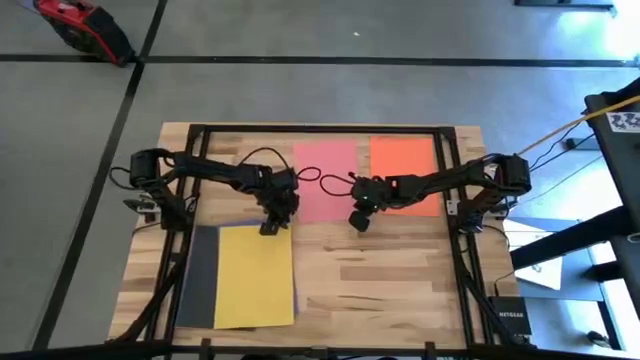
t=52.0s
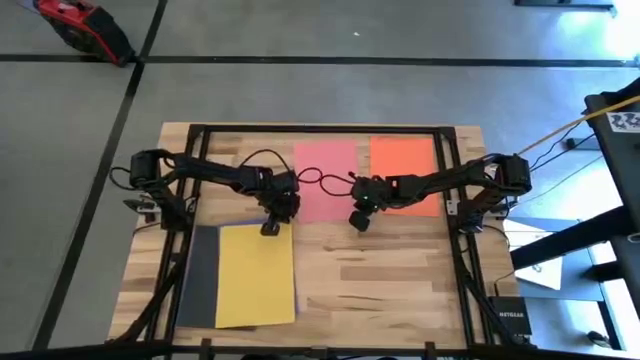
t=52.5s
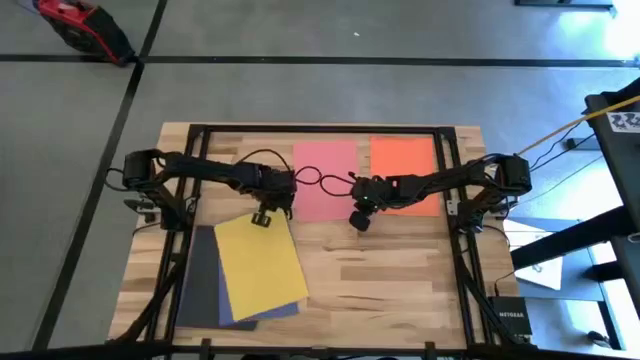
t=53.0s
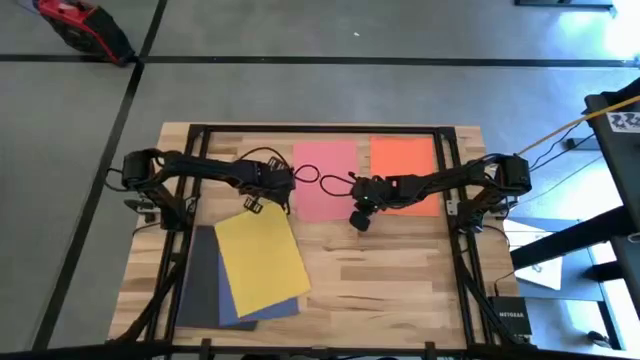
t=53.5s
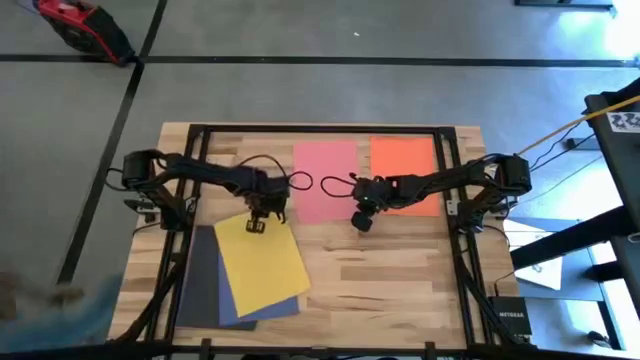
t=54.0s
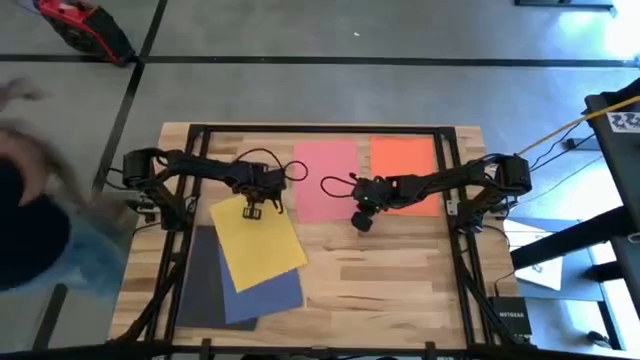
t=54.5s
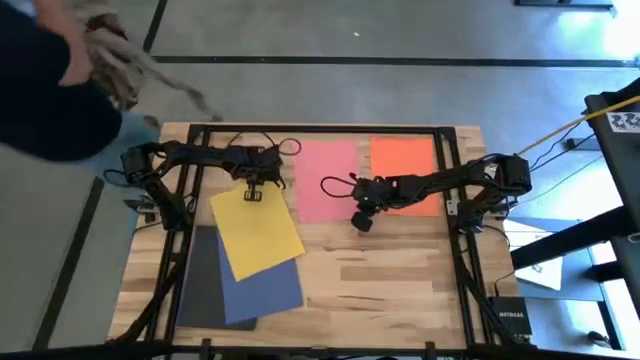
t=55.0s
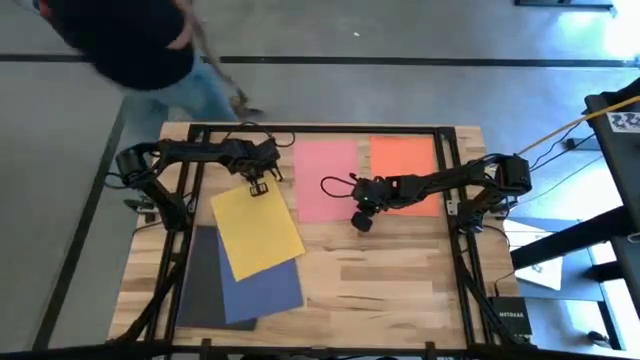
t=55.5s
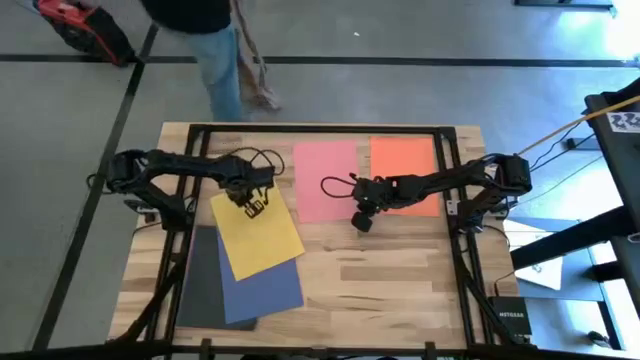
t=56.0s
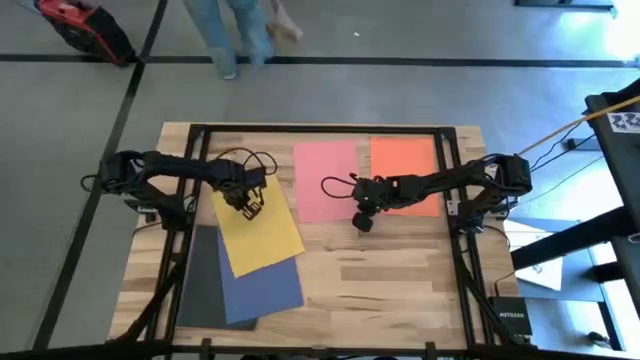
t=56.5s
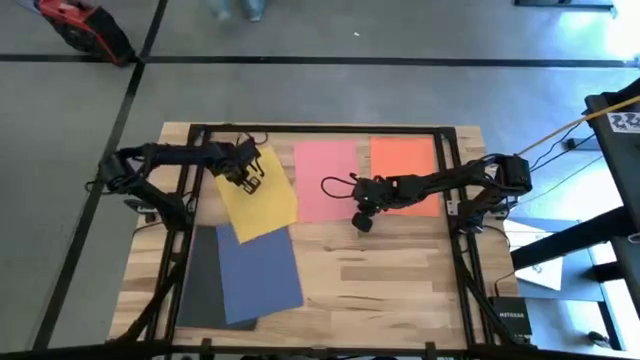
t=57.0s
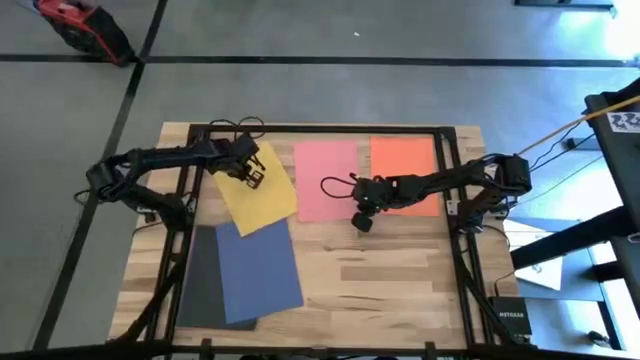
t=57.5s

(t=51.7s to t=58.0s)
Task: Organize paper
Move the yellow paper from bottom right to top left table

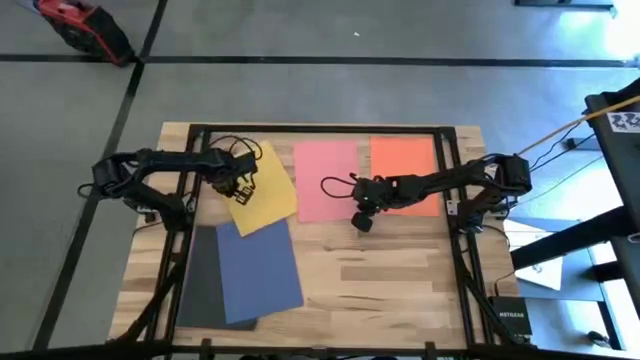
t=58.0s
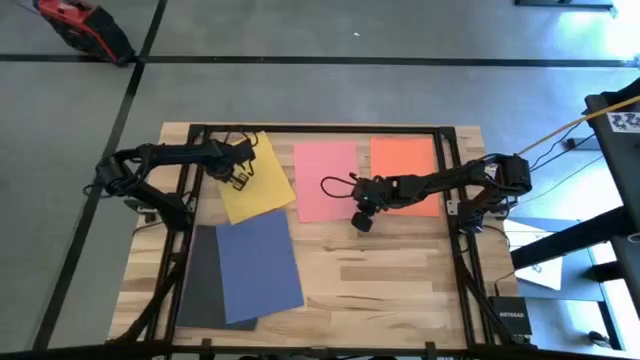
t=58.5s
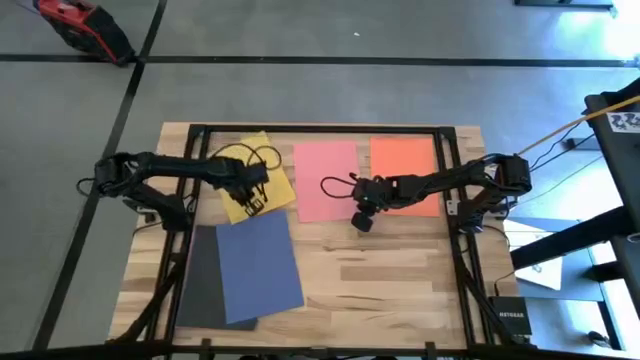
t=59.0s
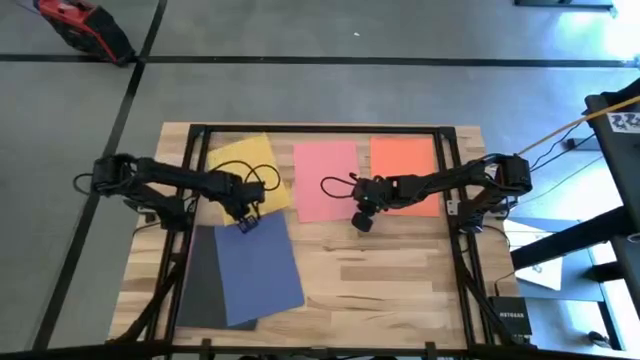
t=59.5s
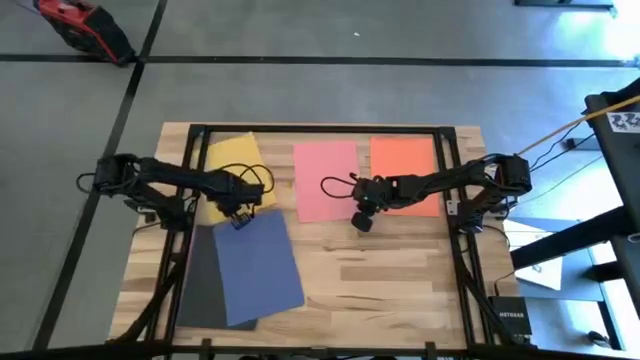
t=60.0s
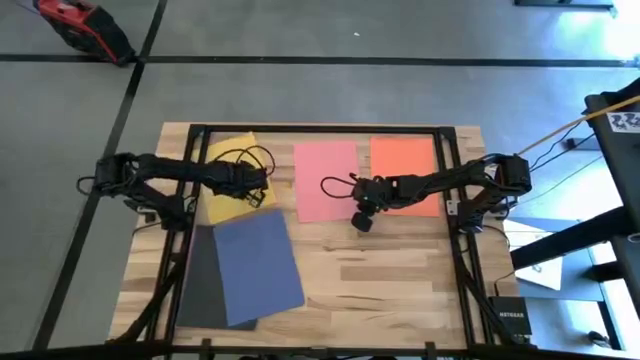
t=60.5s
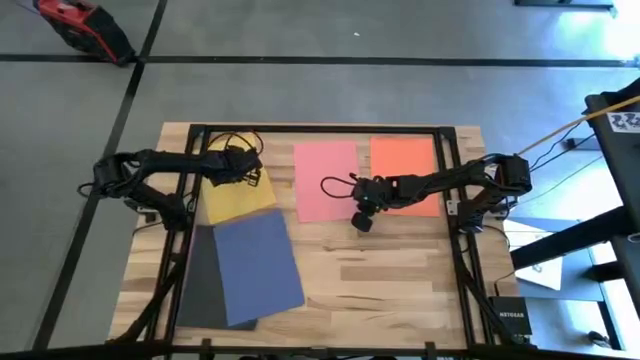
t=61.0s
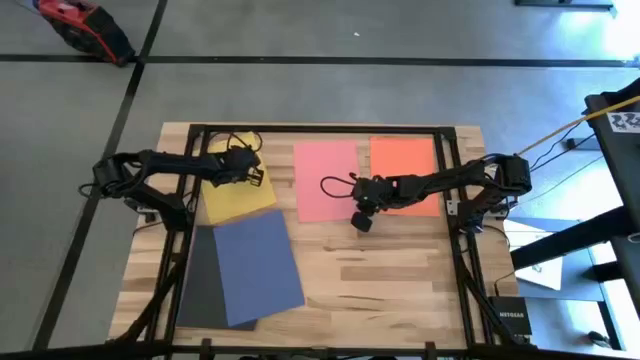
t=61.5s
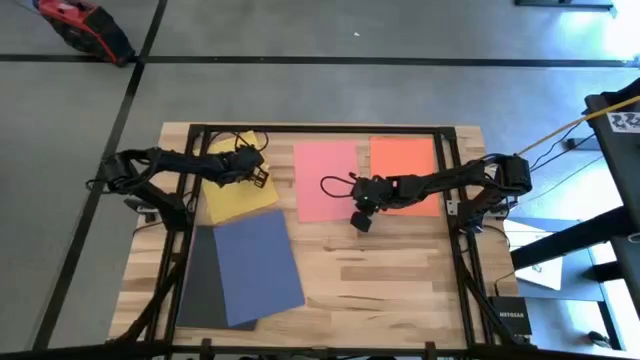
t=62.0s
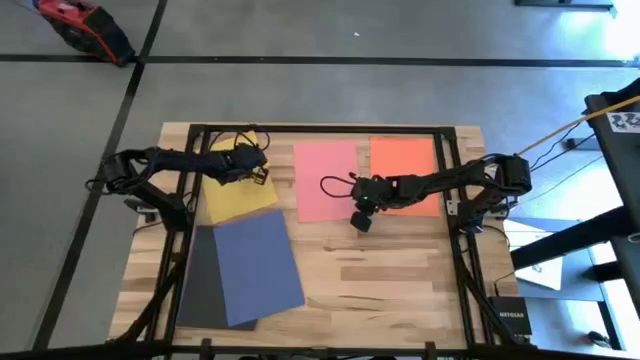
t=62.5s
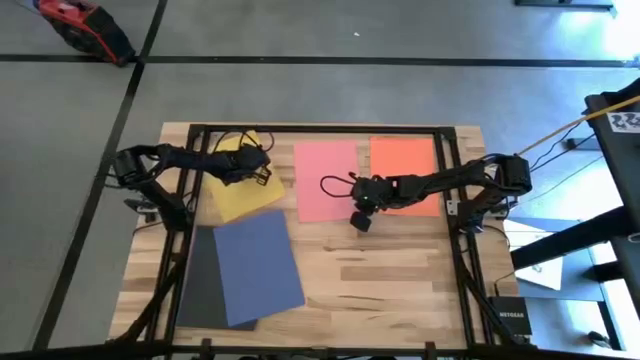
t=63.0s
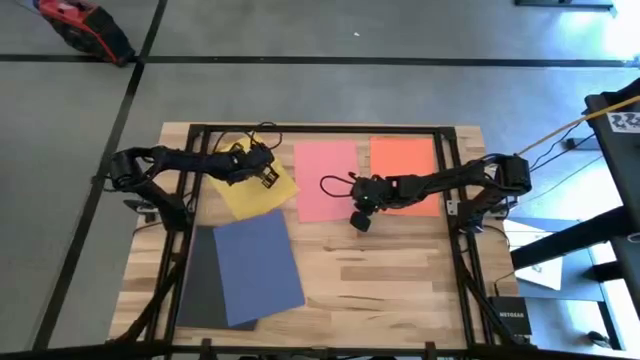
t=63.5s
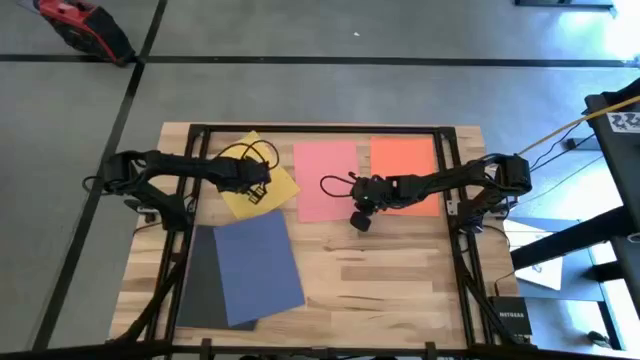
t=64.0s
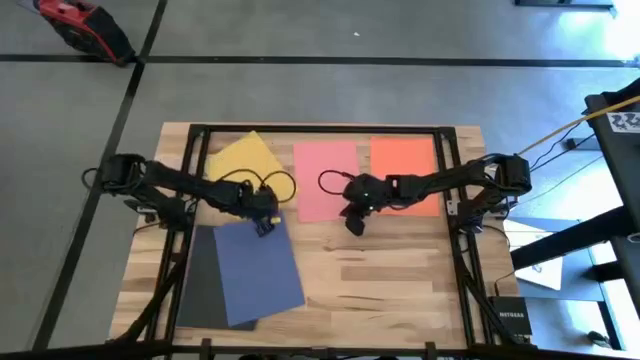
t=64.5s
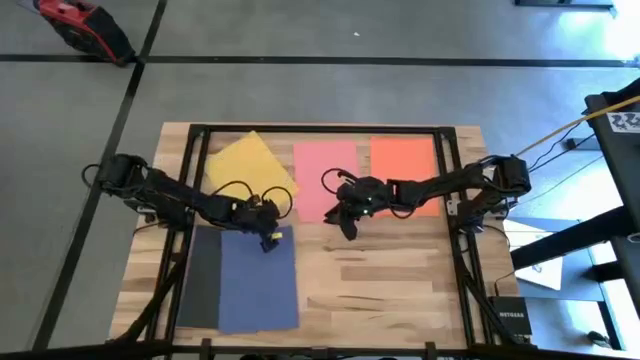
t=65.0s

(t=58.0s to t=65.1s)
Move the yellow paper from bottom right to top left table

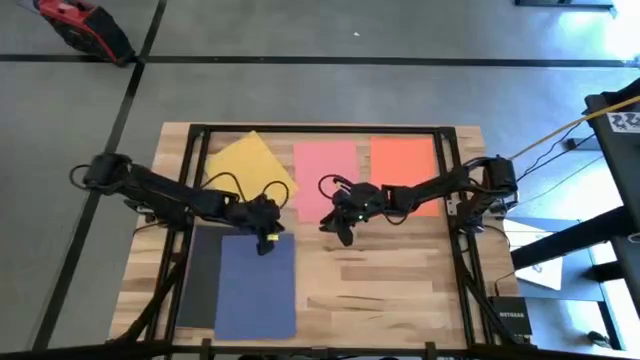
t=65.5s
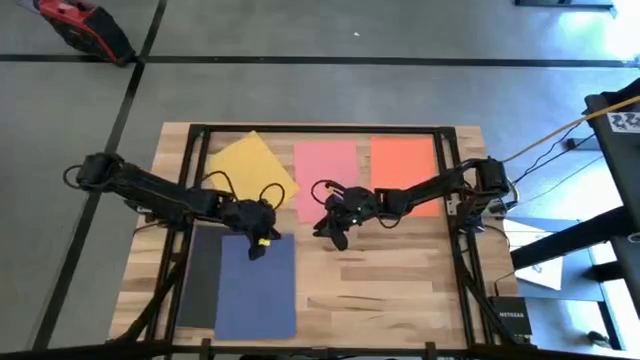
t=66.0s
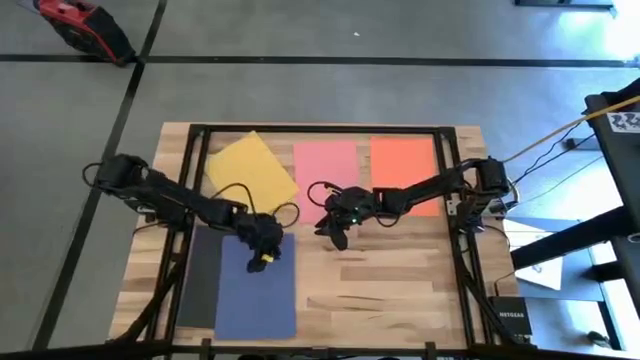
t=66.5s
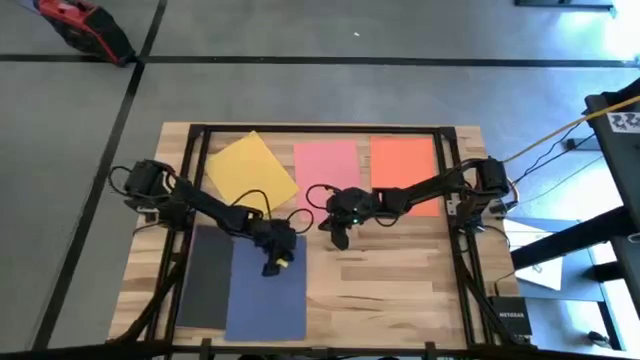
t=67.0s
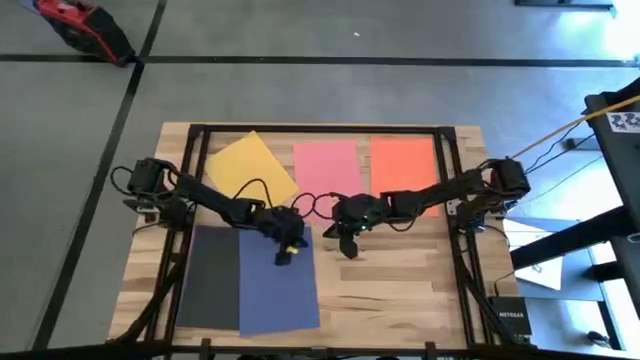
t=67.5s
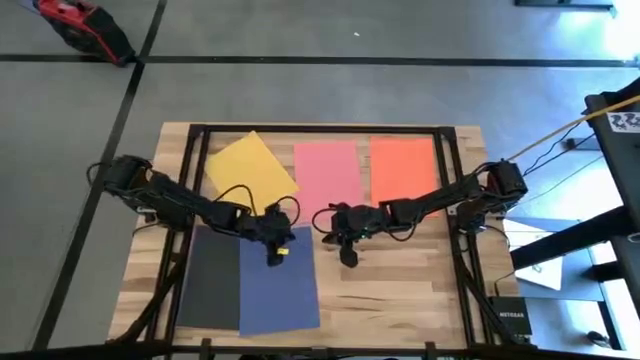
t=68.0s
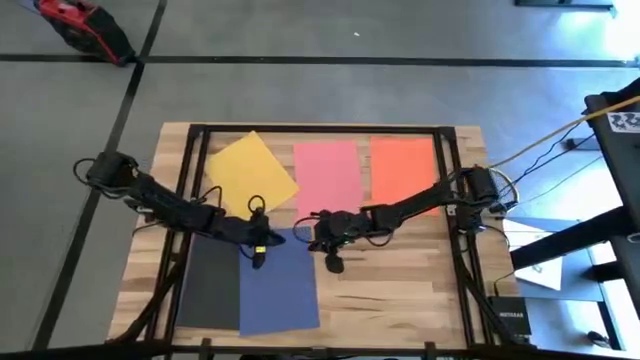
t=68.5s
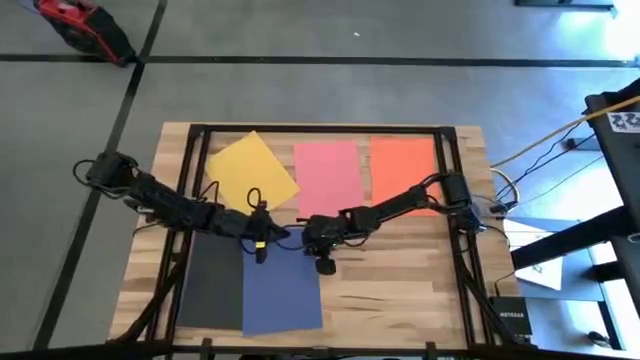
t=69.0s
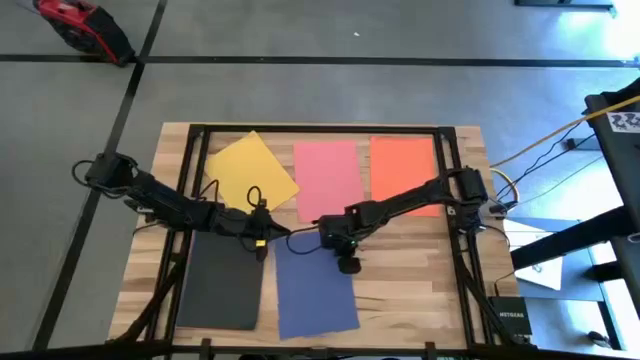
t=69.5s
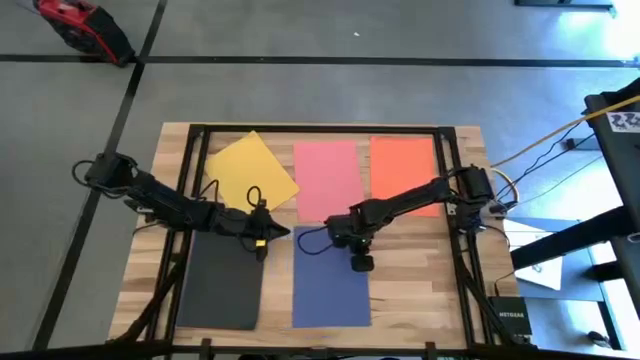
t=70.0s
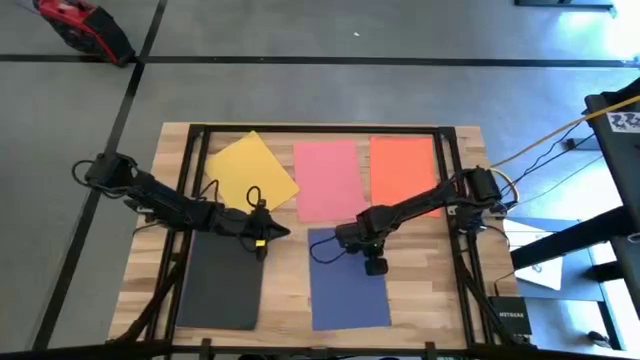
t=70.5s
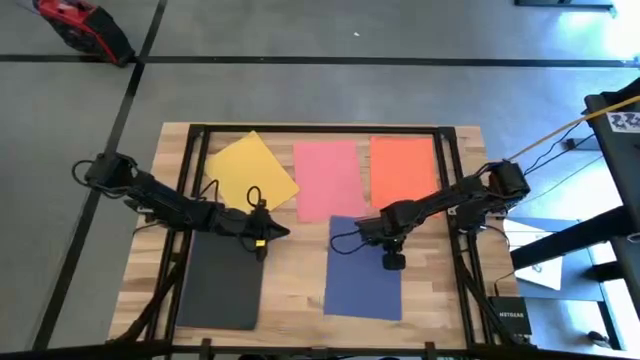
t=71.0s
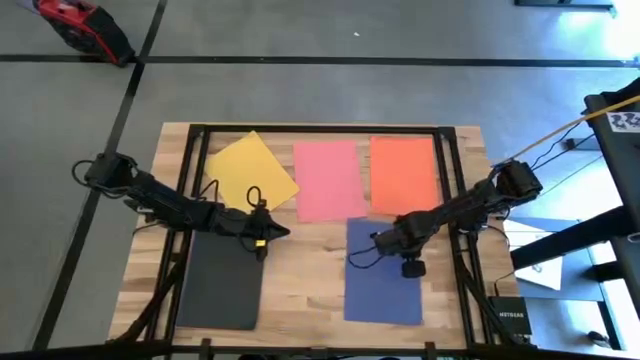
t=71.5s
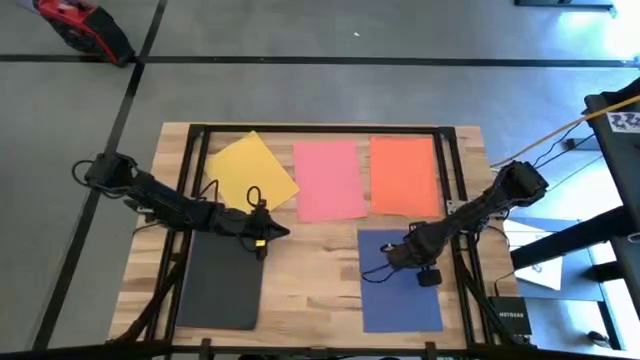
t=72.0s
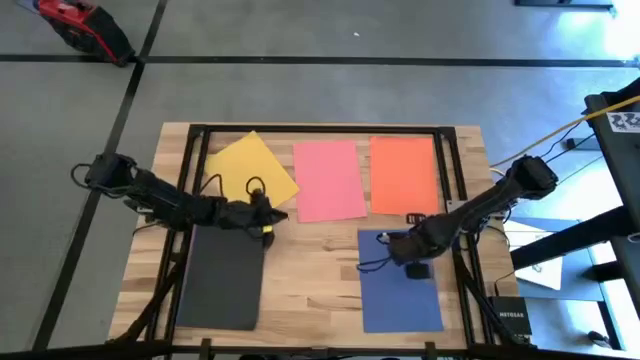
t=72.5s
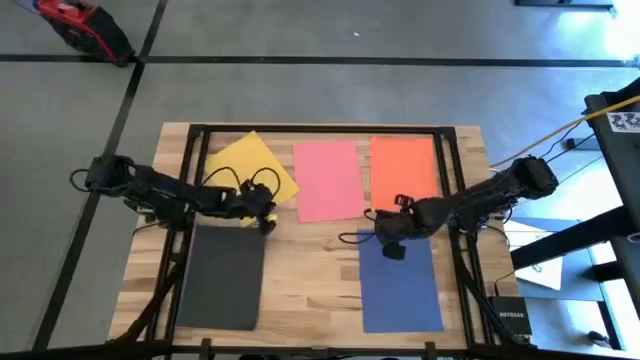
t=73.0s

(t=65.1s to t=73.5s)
Move the blue paper from bottom left to bottom right table
